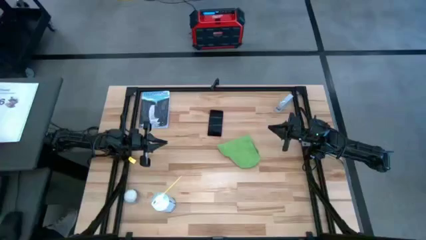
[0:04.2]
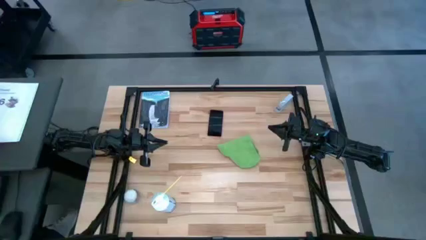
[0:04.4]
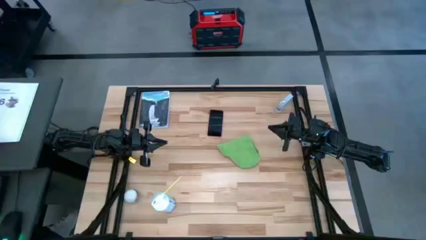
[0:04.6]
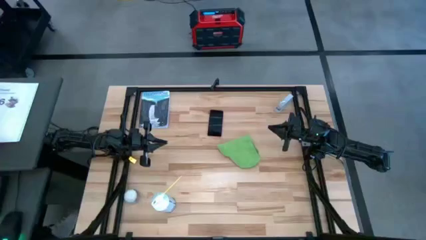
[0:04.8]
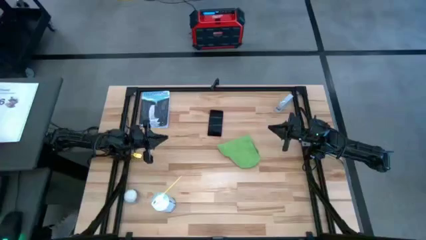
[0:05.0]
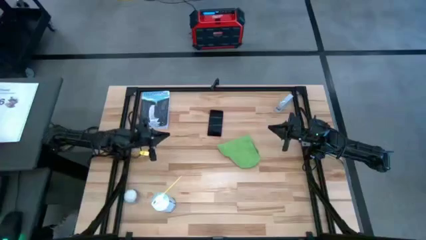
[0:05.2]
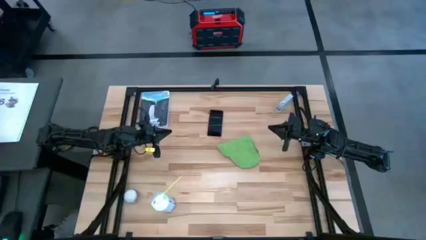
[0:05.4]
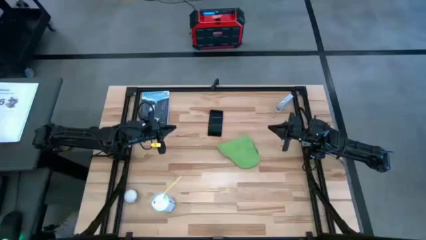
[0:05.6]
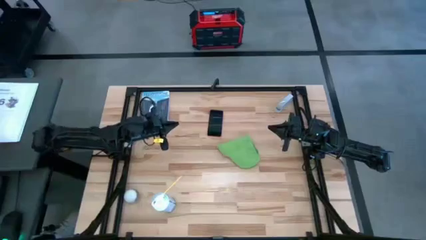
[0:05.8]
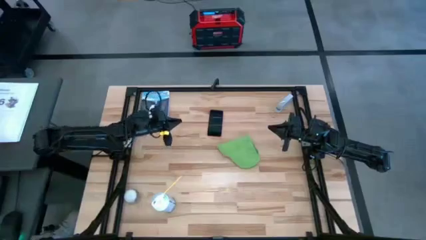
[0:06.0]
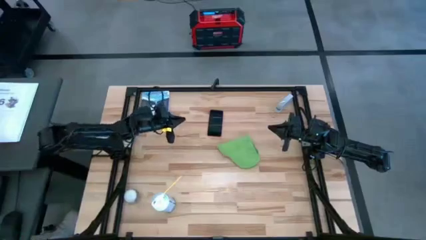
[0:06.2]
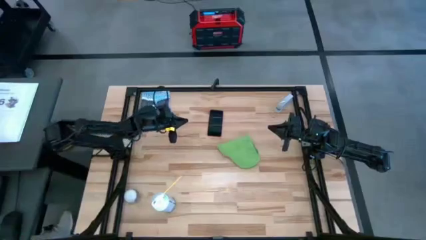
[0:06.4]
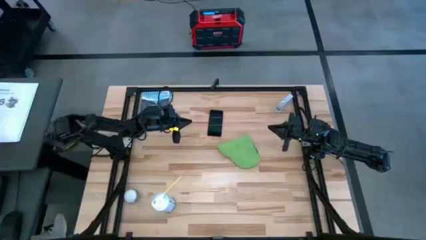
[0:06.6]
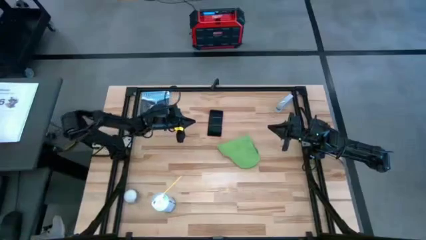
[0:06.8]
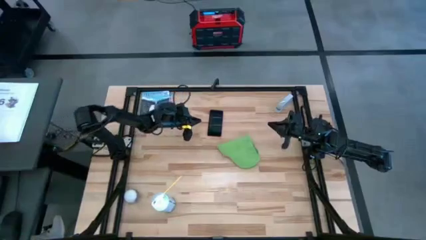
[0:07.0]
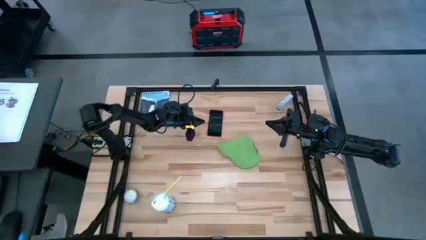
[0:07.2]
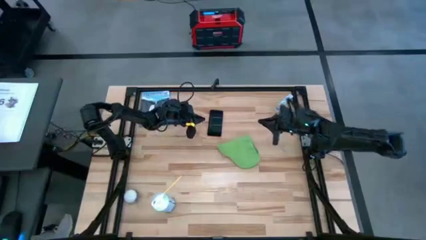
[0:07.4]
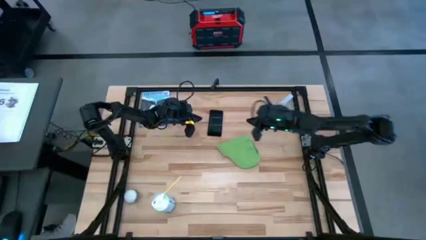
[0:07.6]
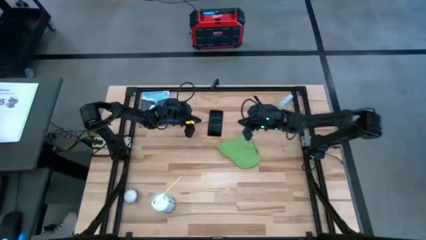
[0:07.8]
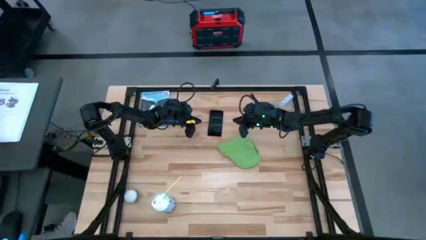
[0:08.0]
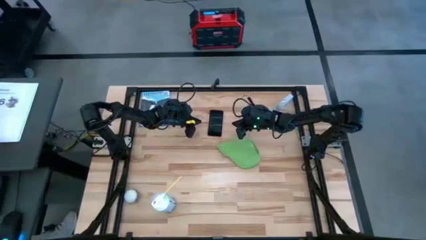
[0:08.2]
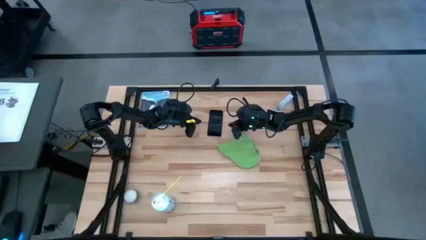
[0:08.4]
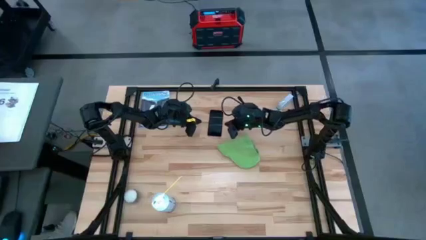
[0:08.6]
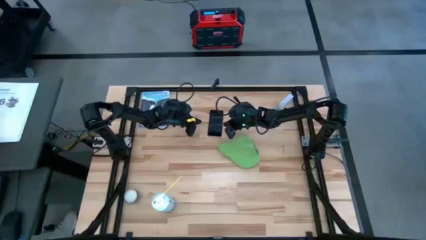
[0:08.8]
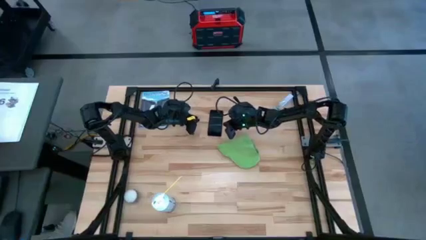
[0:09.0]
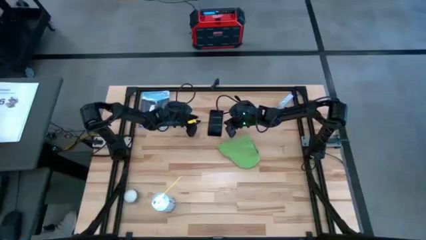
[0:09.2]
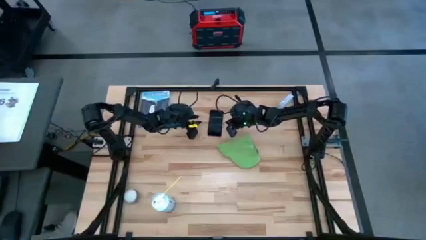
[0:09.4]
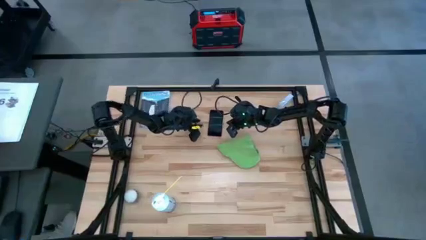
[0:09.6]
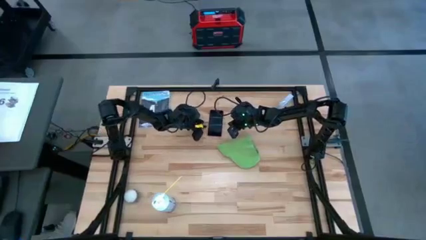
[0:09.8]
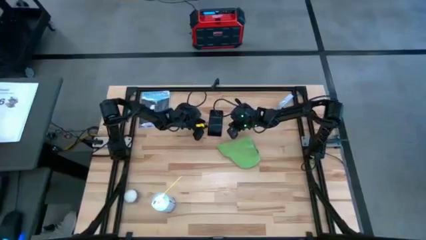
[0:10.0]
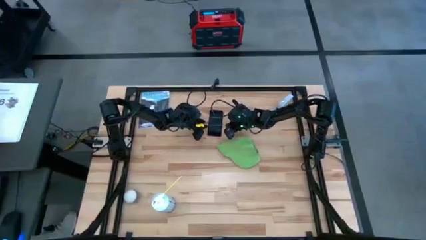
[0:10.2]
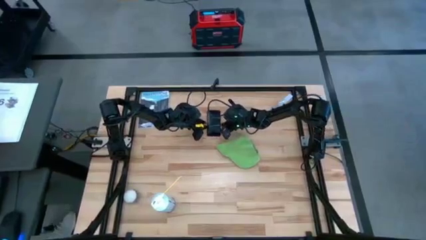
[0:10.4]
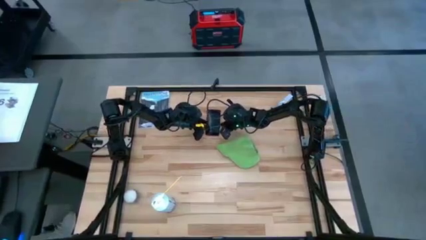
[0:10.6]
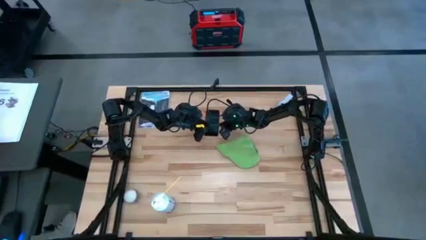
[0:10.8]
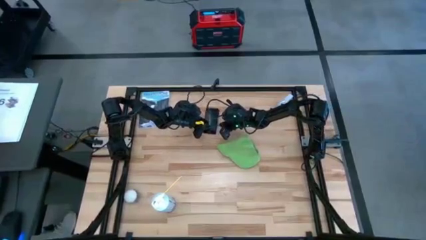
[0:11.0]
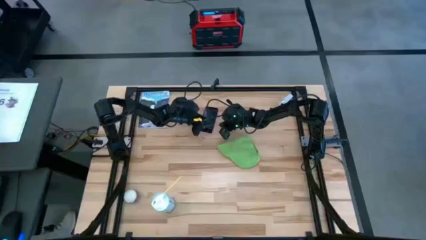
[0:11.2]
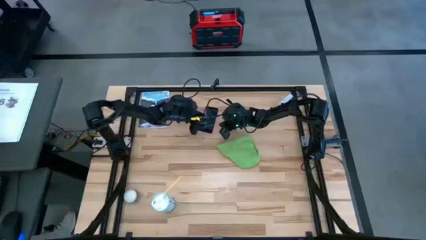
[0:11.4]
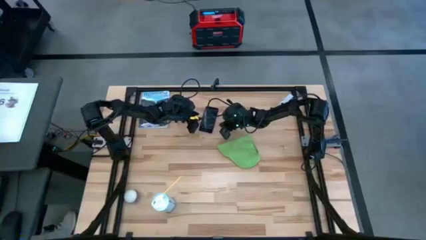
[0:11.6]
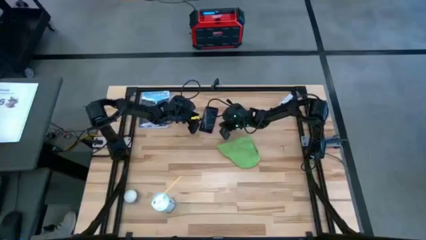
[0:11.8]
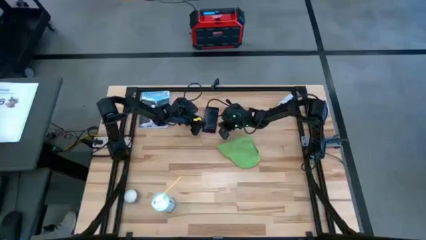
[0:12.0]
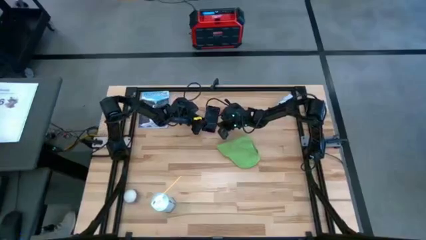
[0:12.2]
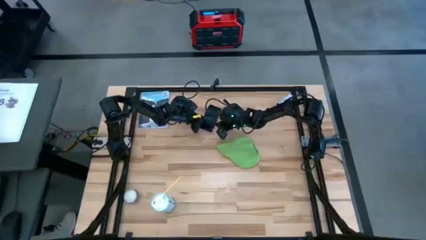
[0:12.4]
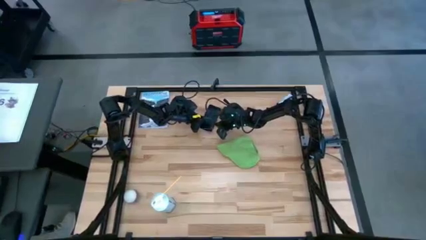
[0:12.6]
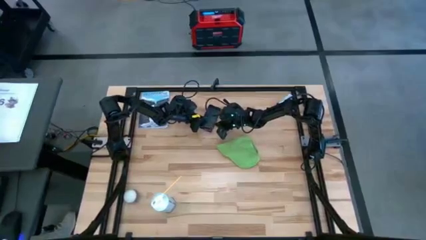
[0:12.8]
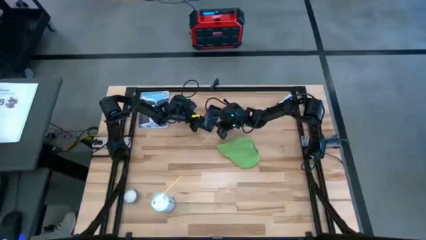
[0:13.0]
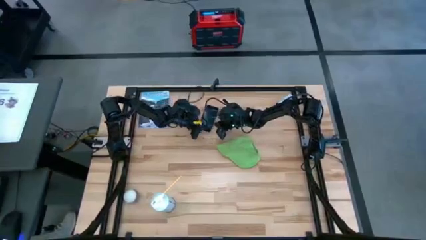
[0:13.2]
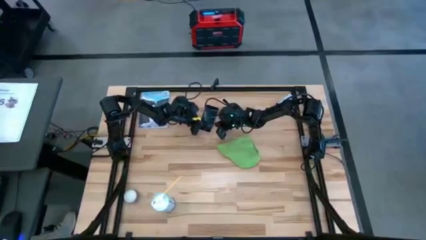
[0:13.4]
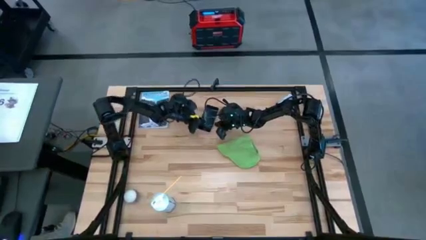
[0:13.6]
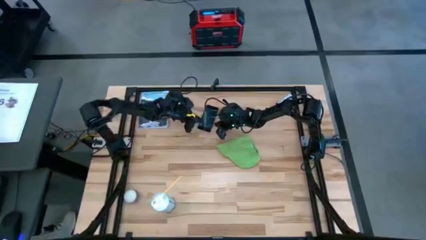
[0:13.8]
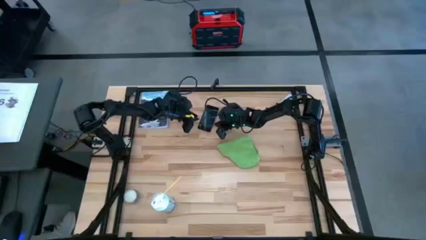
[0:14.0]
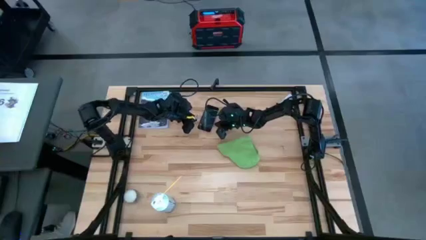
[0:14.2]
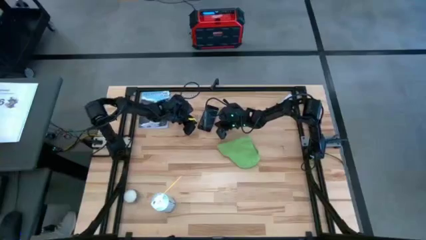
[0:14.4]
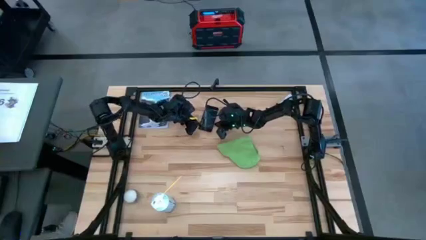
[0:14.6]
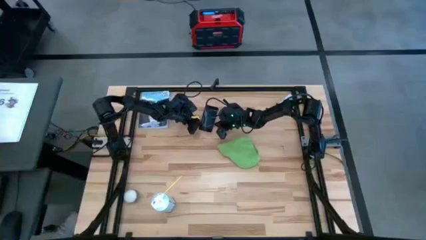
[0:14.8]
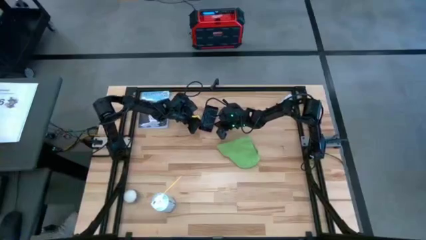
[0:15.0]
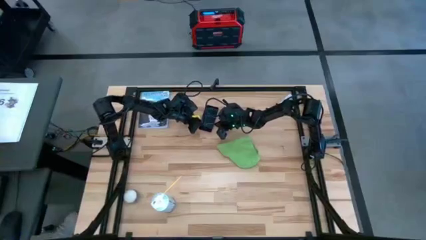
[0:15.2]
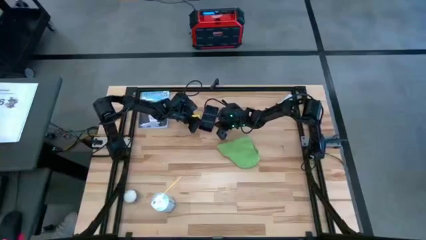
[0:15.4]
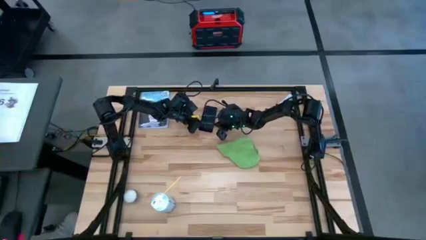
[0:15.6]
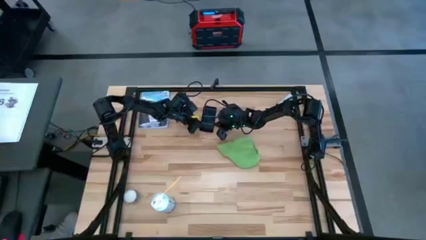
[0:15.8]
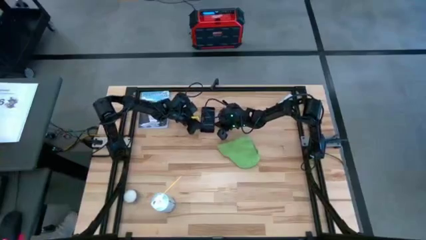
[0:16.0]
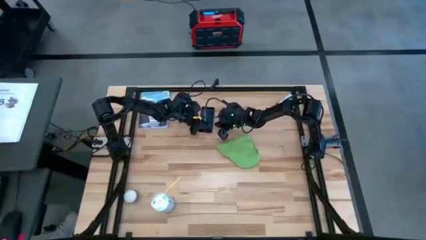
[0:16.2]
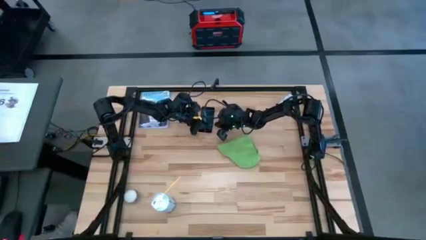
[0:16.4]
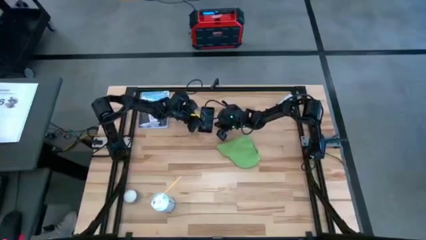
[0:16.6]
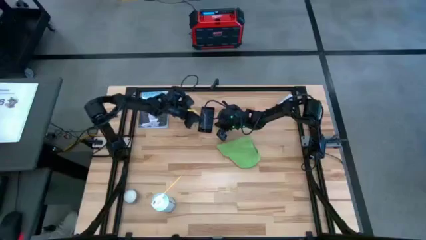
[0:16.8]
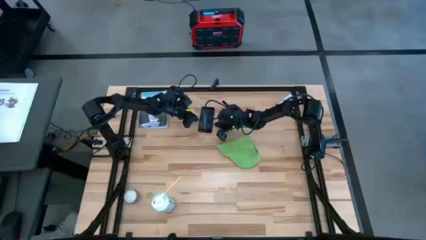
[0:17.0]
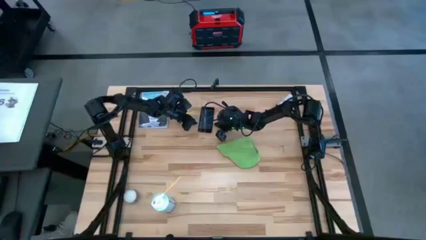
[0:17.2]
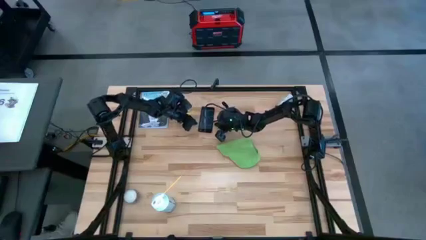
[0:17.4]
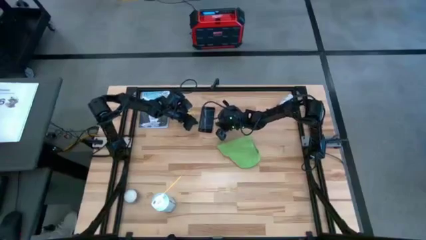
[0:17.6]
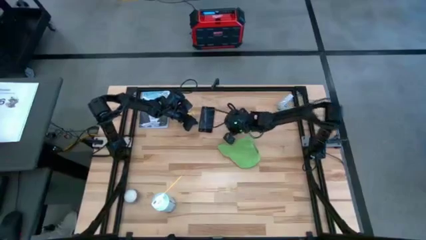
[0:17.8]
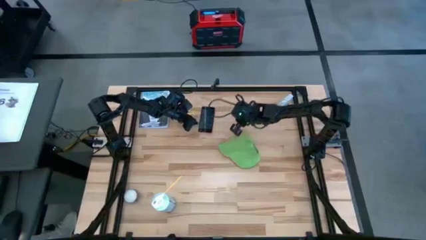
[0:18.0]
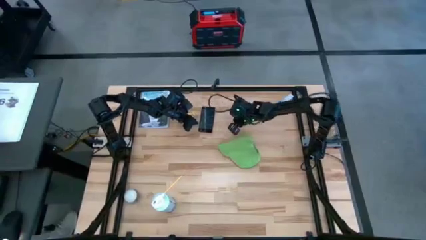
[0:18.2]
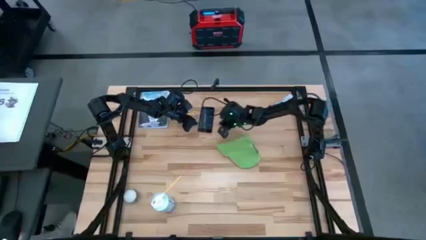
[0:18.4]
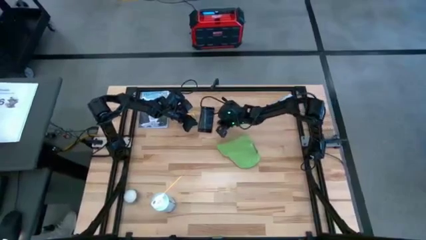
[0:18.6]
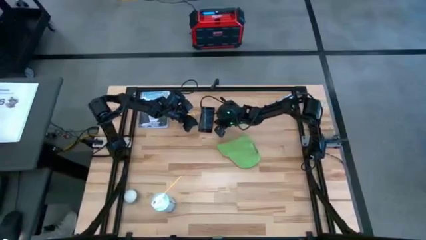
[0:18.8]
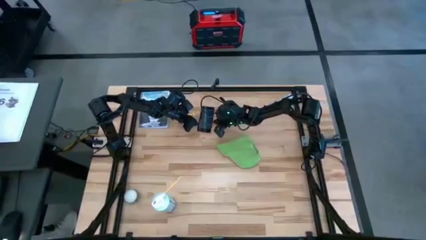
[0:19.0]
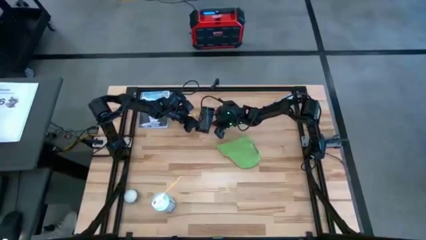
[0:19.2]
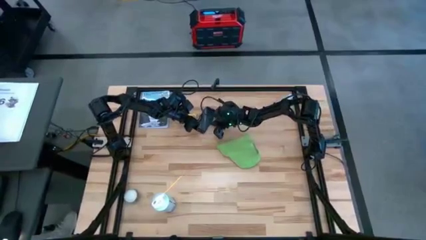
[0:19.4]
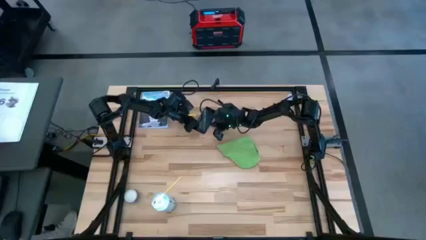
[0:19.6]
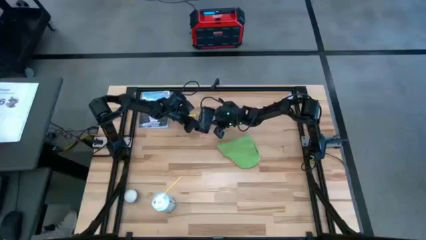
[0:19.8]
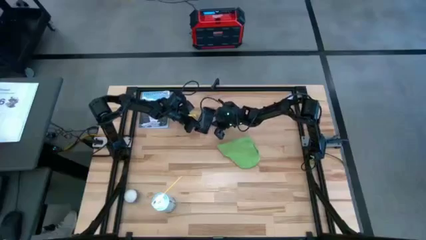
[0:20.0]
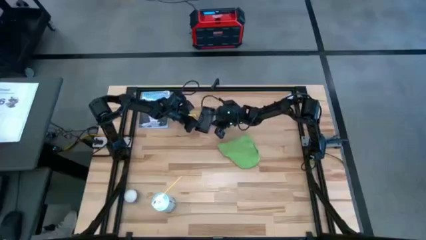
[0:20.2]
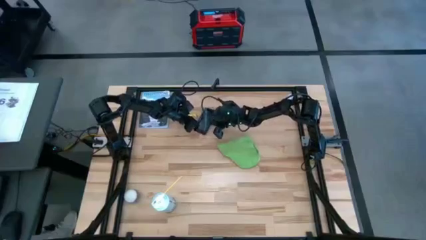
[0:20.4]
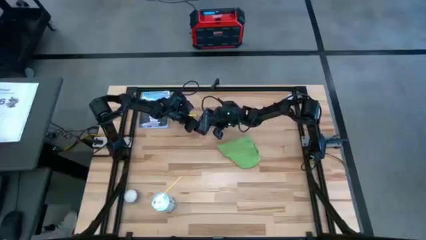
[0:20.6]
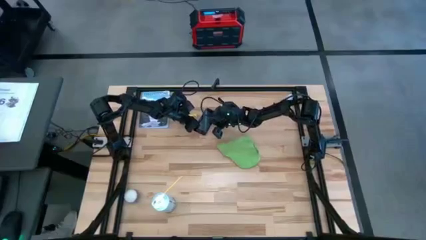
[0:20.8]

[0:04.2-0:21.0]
Task: Apply microfiber cloth
Spray the front of the black cellphone with the white spray bottle
